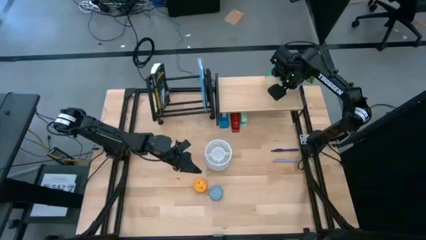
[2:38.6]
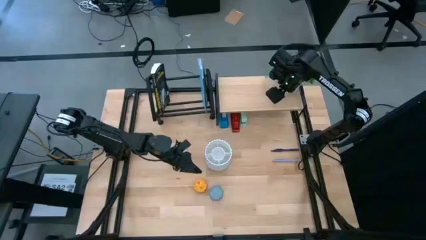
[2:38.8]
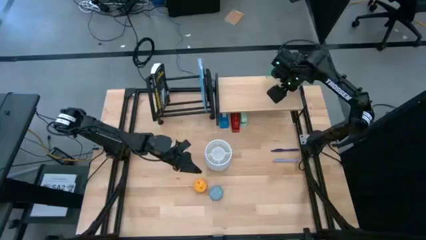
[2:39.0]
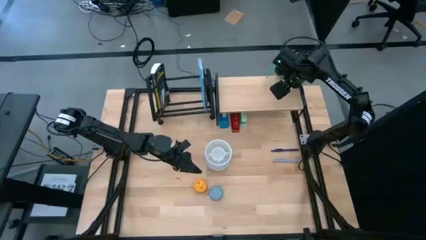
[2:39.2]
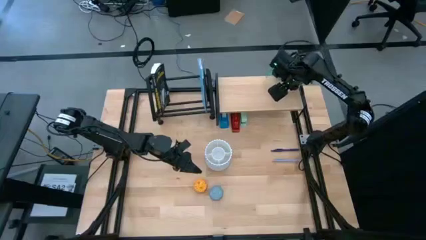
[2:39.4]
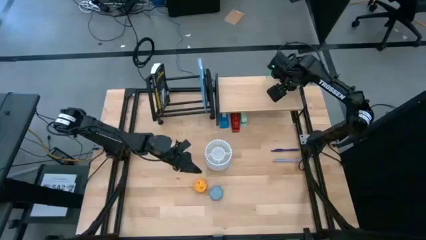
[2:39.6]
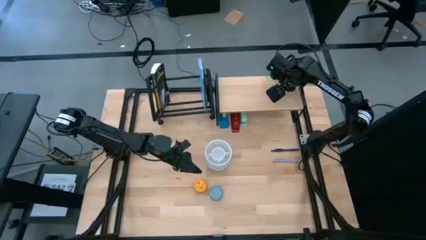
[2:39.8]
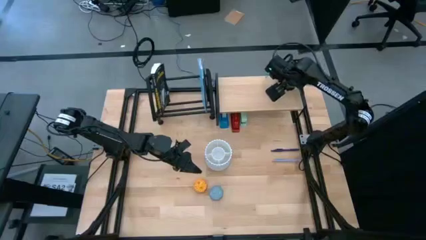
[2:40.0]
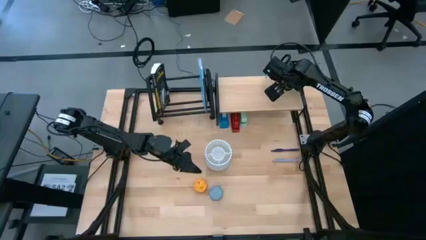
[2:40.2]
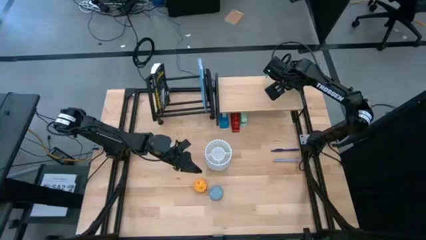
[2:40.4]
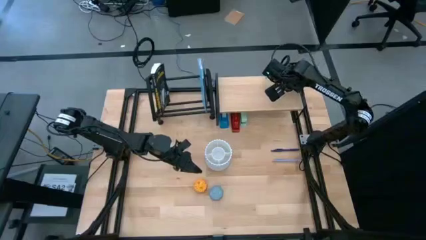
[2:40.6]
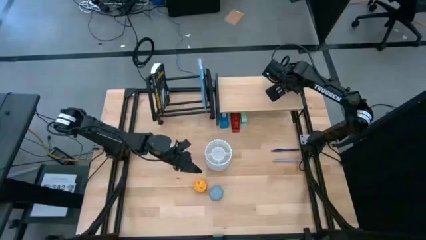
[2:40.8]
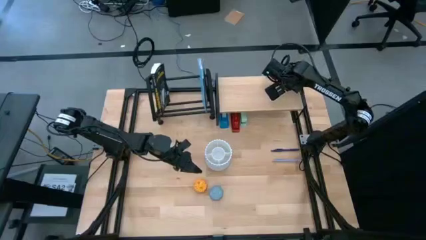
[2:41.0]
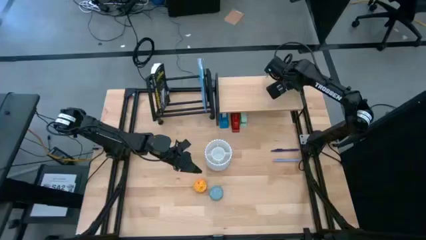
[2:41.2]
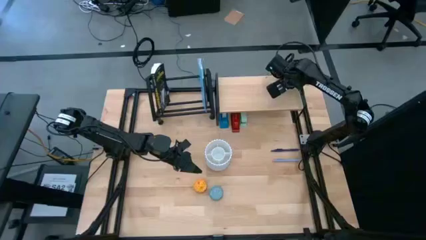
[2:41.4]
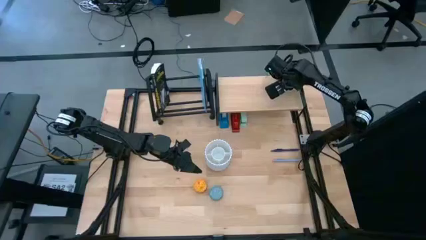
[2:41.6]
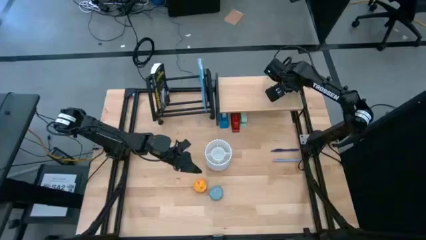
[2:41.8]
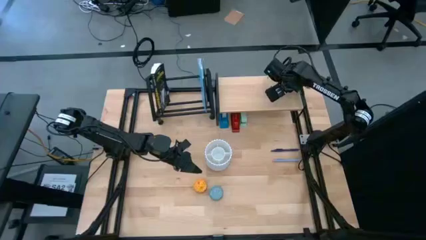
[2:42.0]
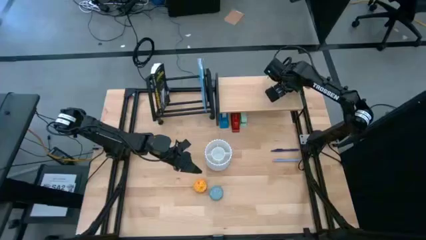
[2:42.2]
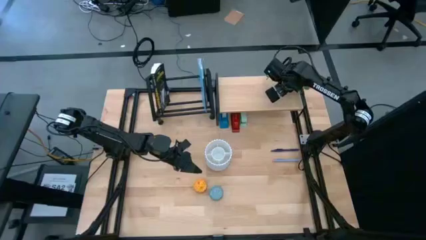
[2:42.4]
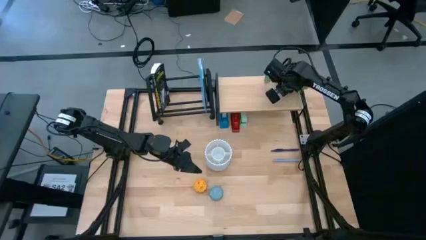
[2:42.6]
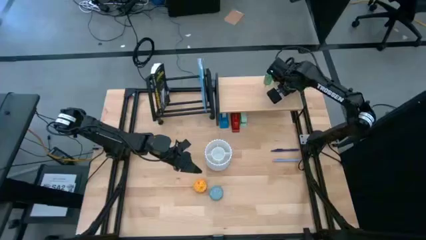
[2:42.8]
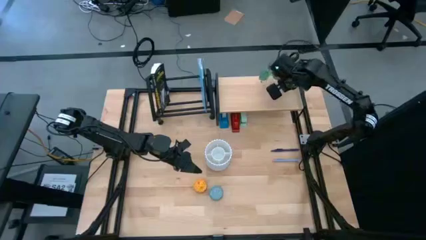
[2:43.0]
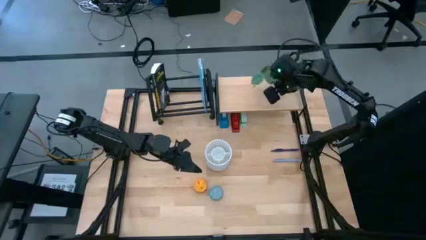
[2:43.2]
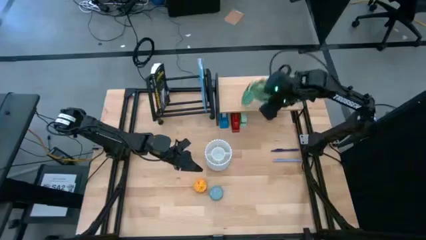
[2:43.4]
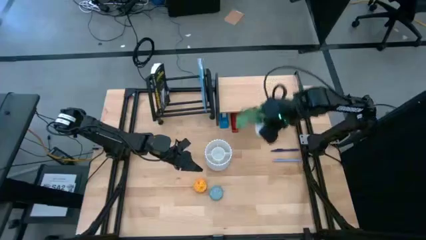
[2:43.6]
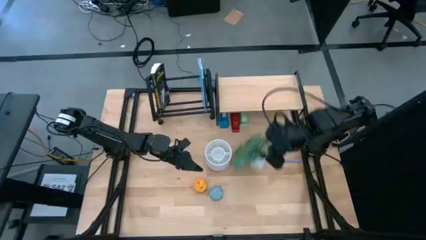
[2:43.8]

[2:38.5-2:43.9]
Task: Stock shelves
Remove the flower pot from the shelf

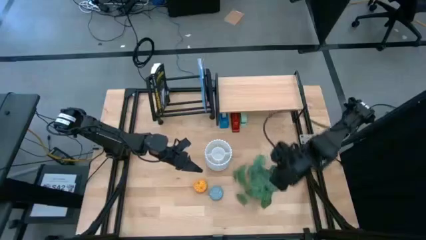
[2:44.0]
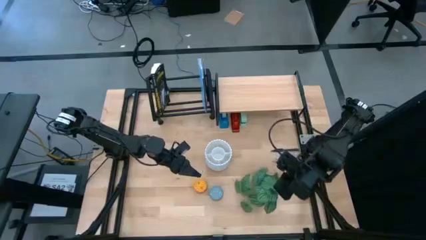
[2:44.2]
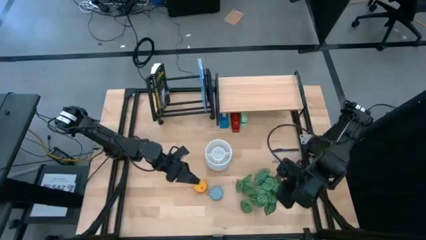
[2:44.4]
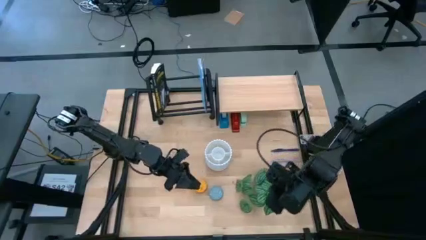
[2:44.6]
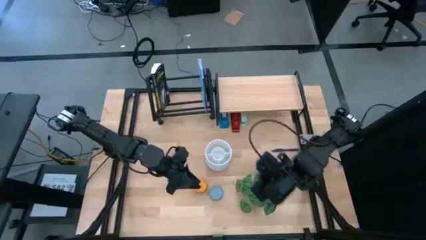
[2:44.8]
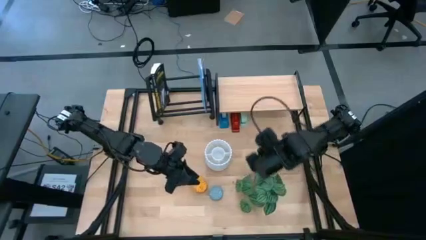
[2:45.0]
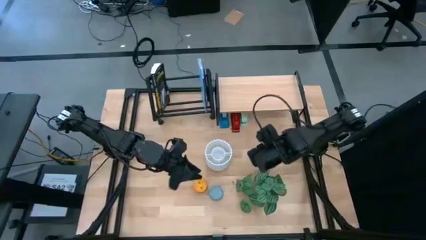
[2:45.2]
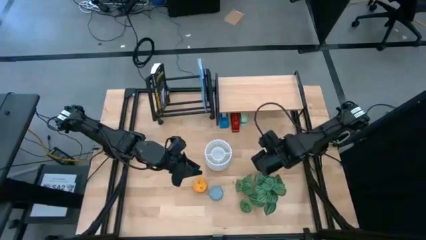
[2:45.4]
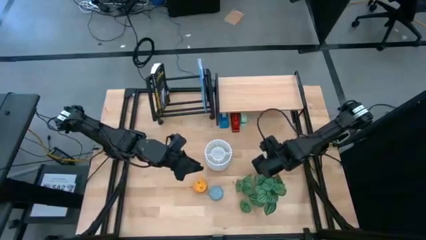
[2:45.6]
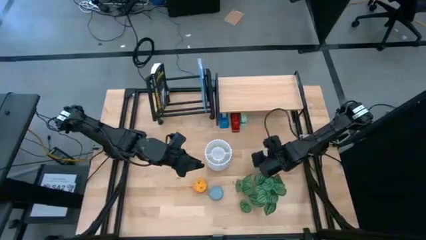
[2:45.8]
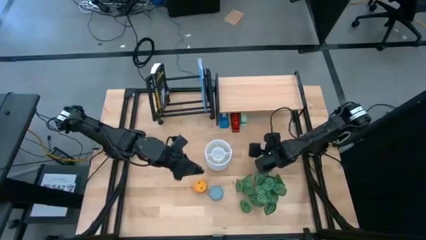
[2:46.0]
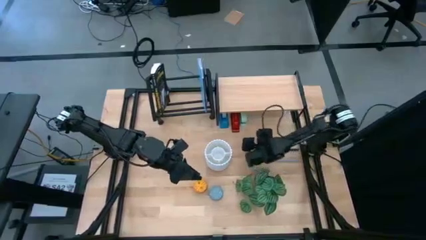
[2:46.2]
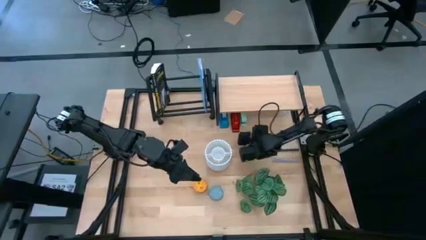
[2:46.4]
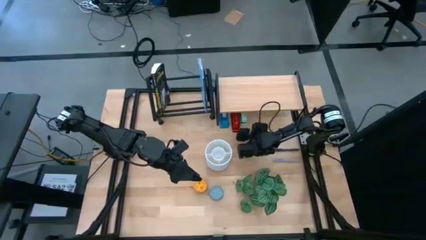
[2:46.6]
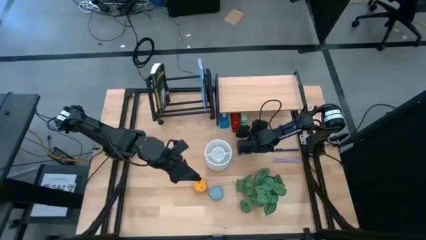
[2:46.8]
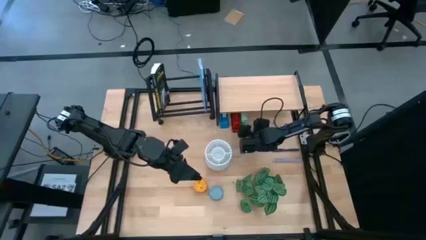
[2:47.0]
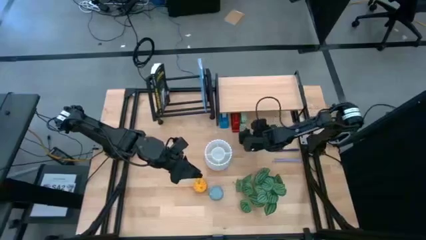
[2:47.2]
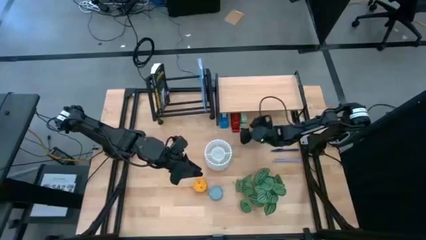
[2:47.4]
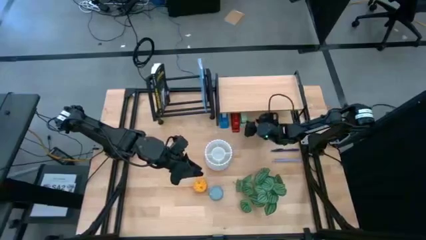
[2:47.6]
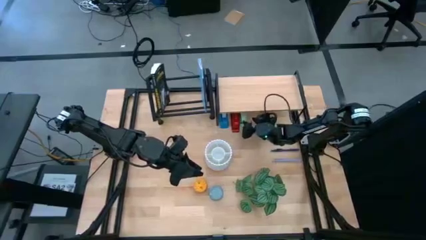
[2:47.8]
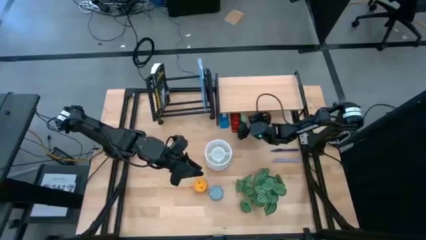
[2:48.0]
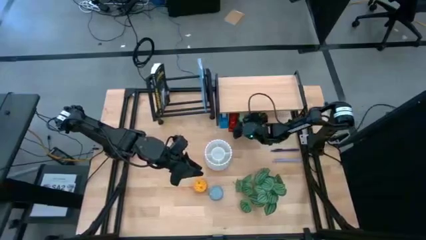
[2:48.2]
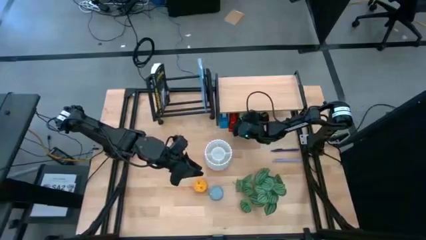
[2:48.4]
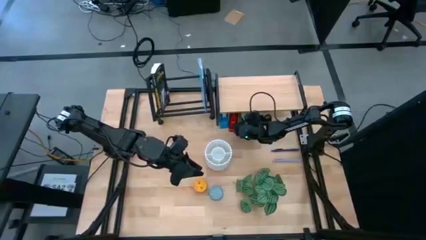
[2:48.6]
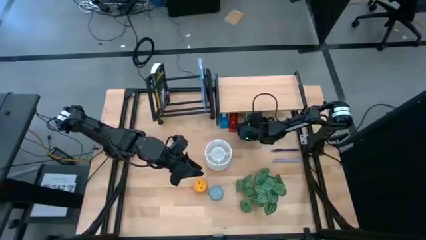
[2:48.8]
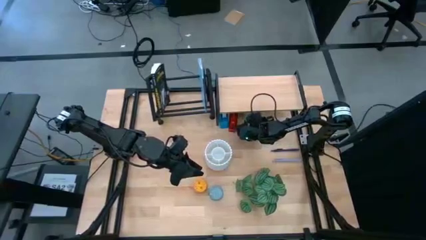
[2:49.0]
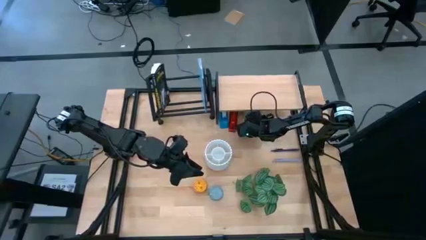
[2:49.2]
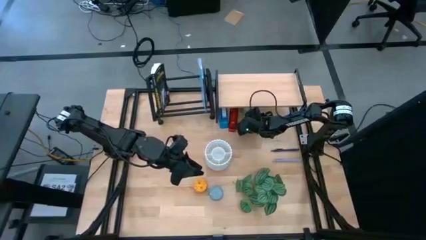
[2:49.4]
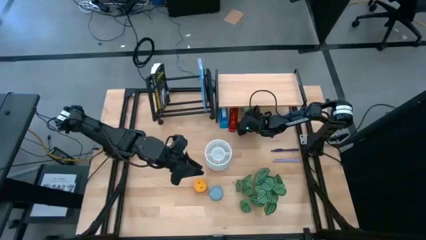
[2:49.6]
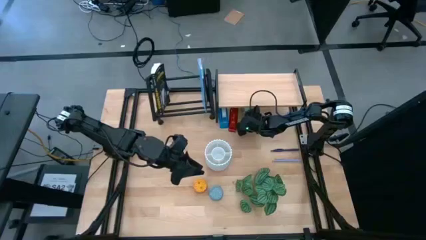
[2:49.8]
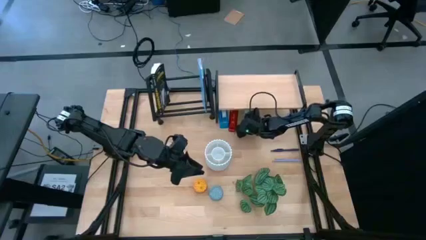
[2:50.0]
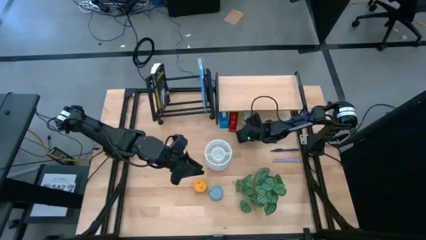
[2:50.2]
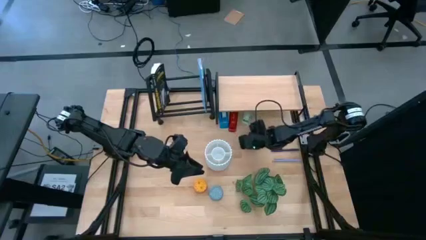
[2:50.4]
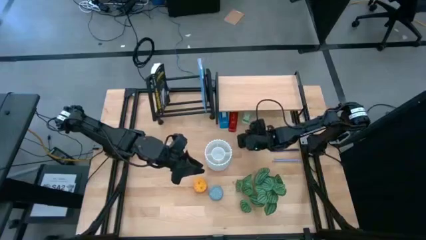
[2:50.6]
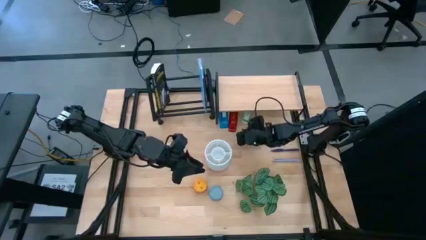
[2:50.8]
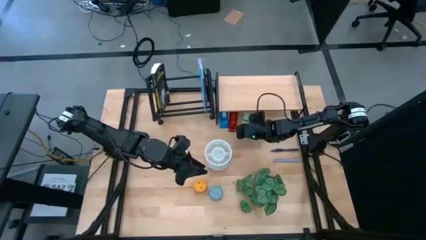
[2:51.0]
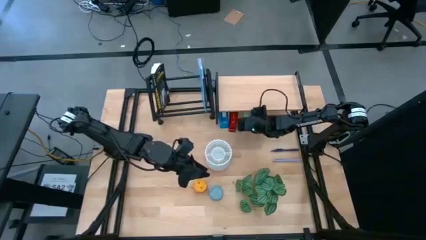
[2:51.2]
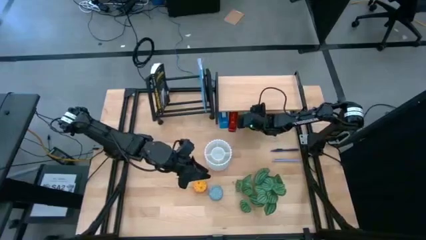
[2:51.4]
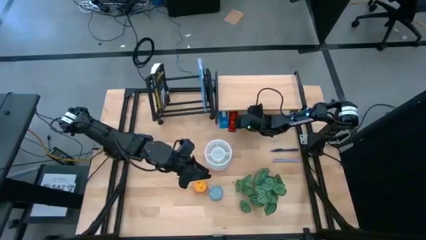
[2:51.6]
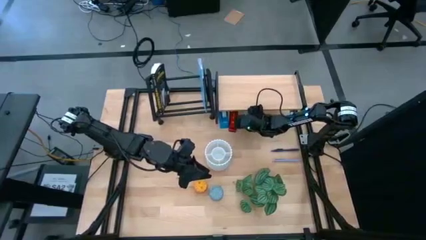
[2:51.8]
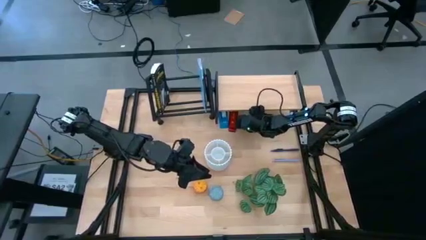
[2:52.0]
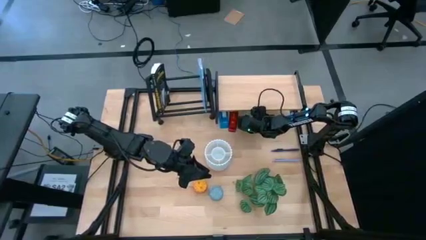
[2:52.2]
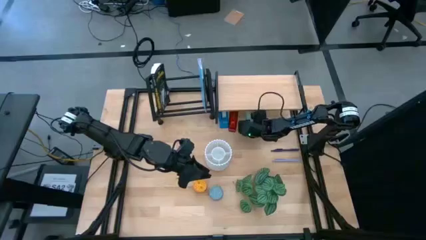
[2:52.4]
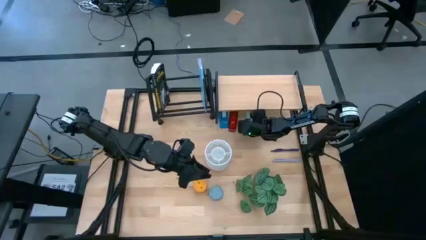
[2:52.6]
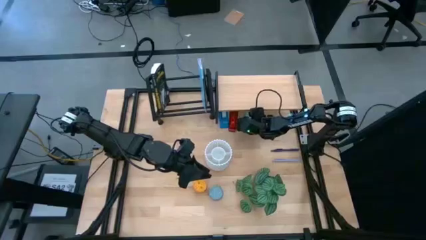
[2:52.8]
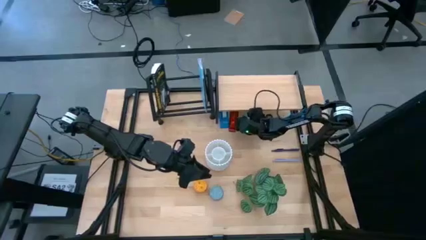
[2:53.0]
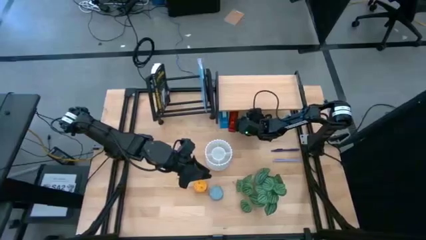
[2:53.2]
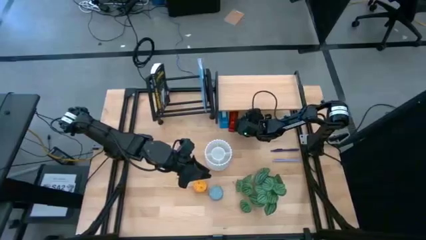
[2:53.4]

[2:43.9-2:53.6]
Remove the green stapler from under the shelf

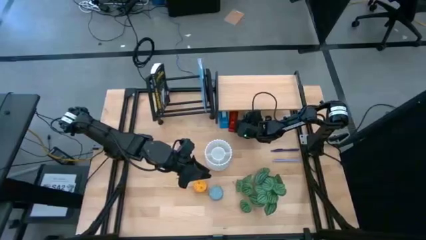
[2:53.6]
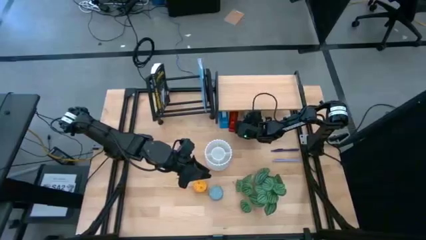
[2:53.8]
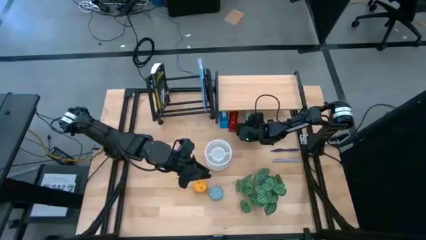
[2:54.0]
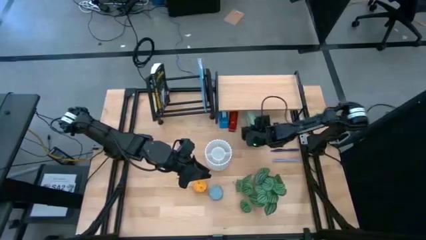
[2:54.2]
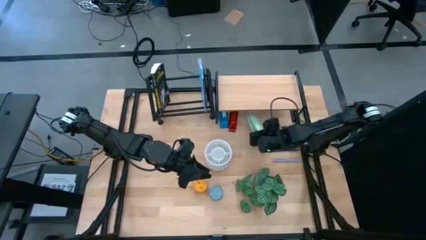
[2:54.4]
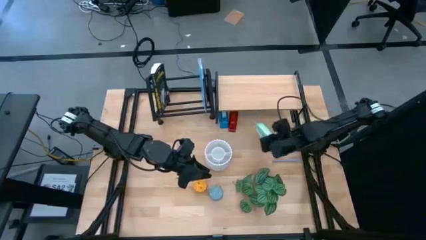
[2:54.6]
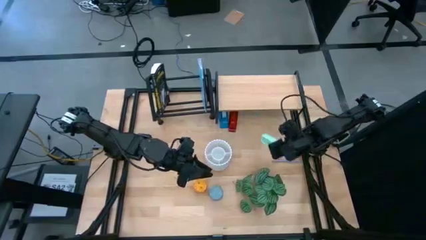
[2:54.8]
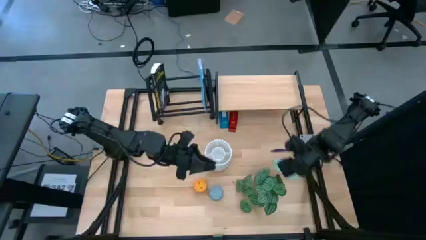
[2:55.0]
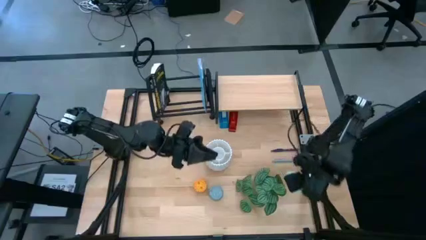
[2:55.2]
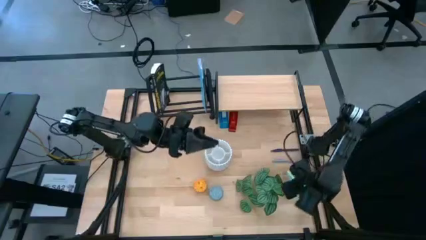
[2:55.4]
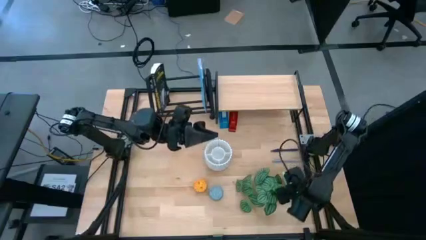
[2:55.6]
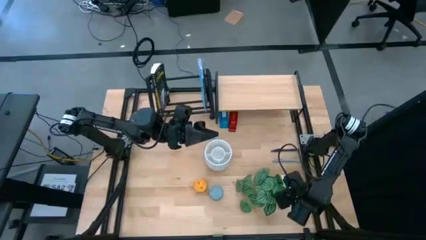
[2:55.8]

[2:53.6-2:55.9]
Remove the green stapler from under the shelf
